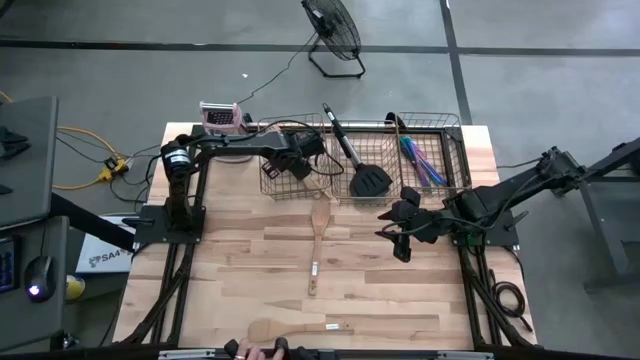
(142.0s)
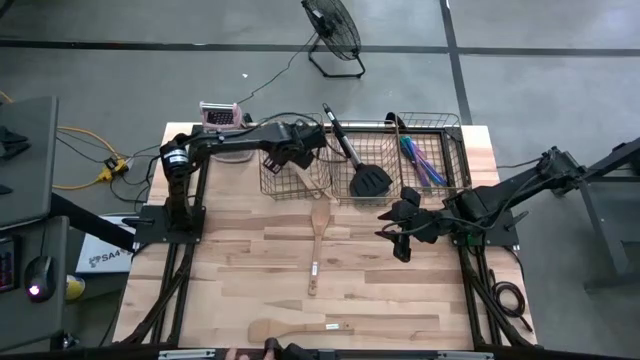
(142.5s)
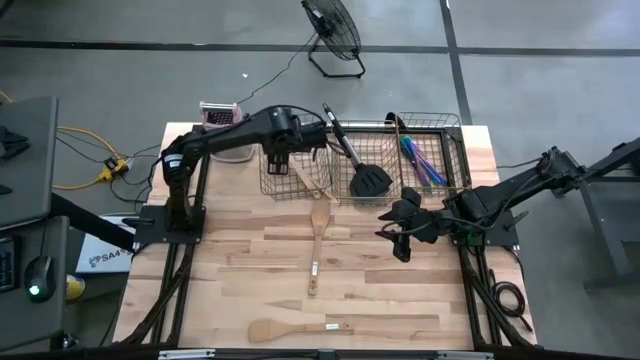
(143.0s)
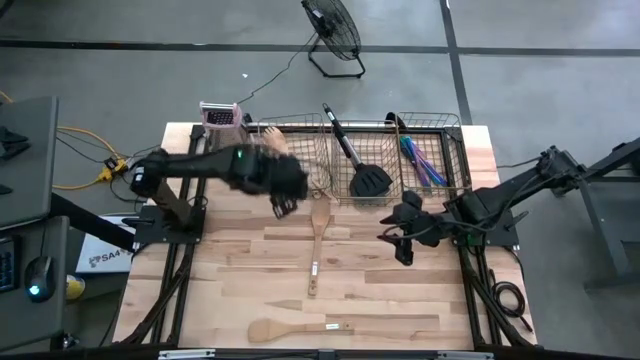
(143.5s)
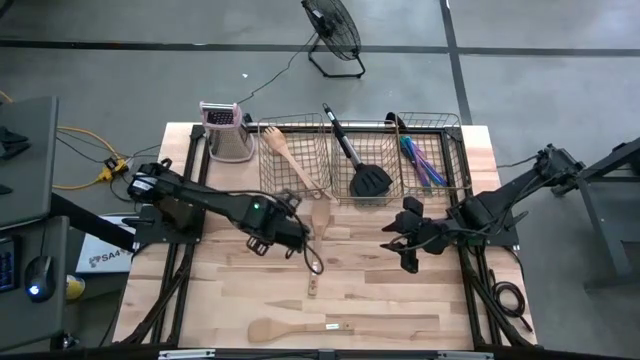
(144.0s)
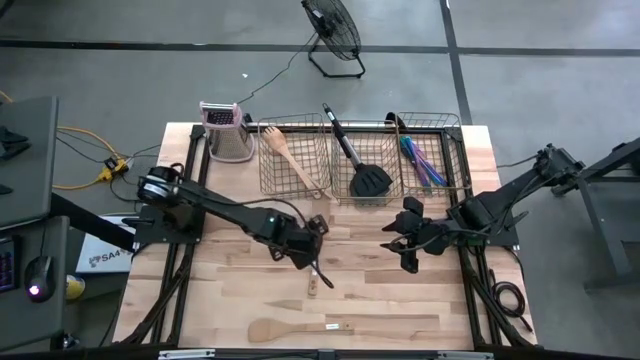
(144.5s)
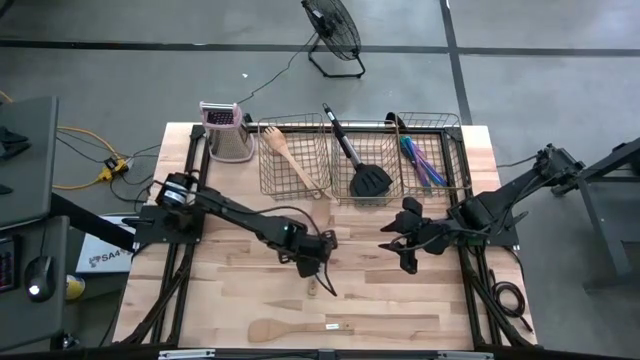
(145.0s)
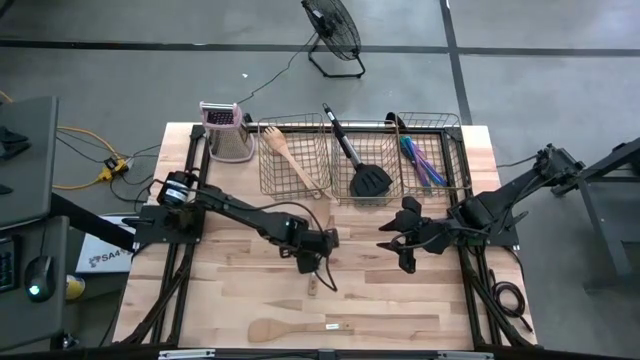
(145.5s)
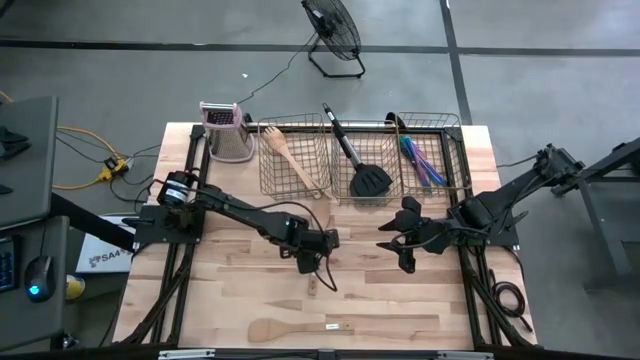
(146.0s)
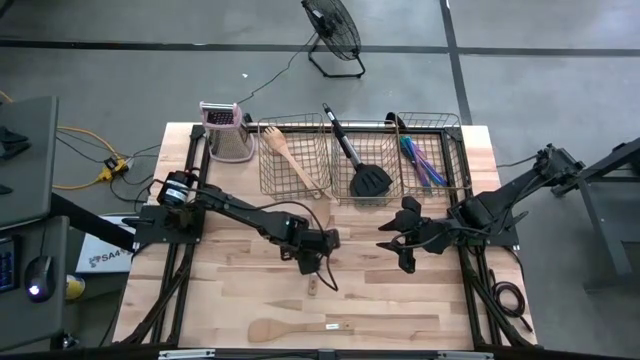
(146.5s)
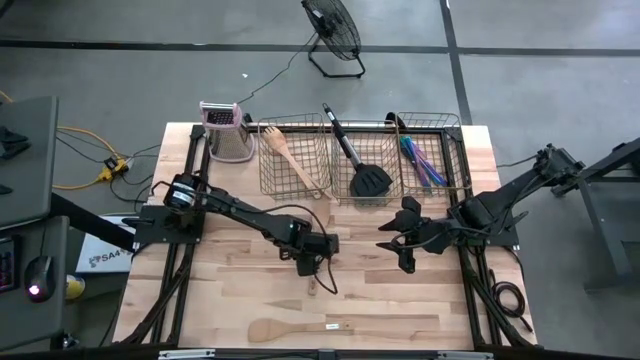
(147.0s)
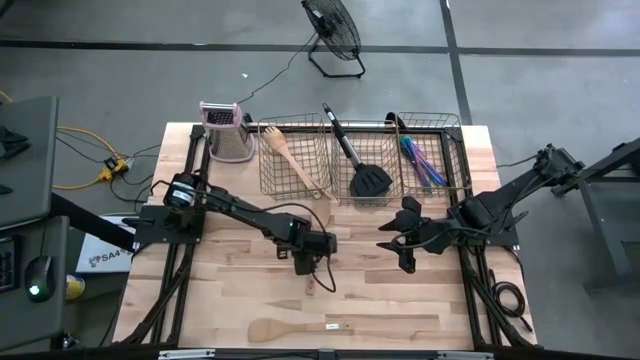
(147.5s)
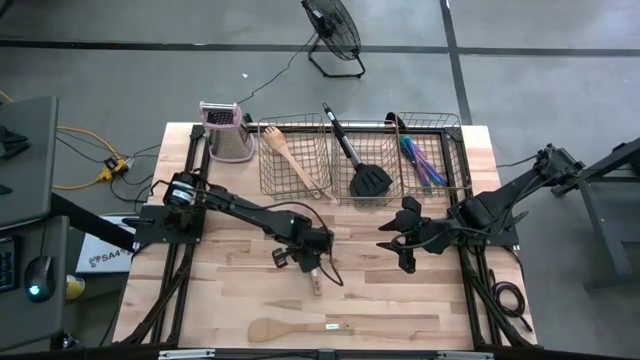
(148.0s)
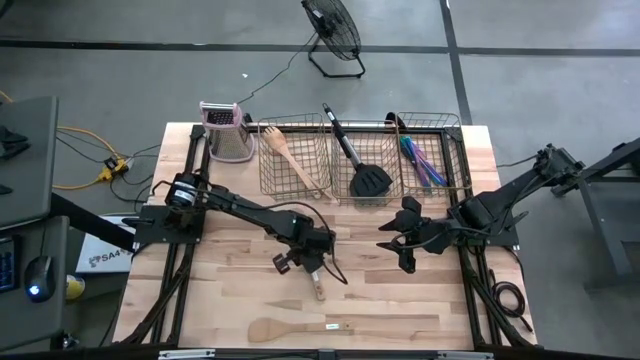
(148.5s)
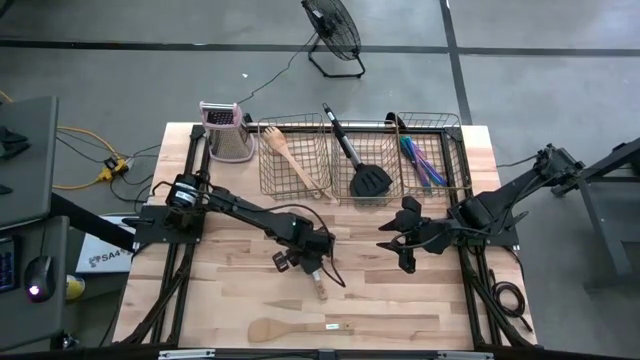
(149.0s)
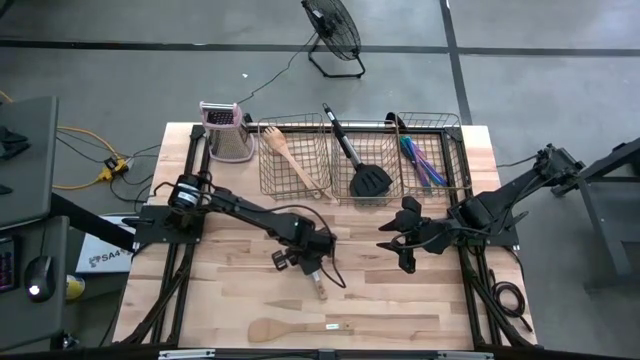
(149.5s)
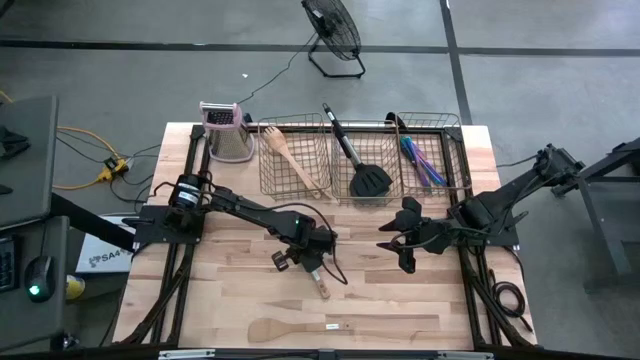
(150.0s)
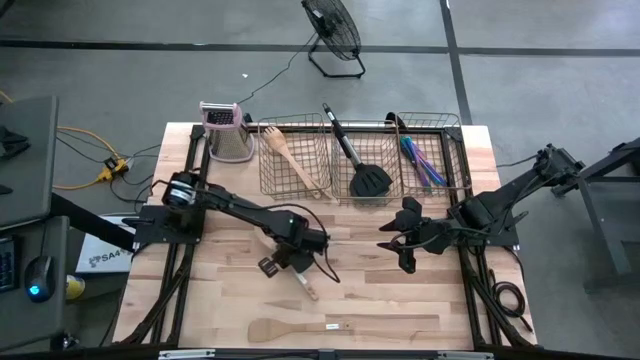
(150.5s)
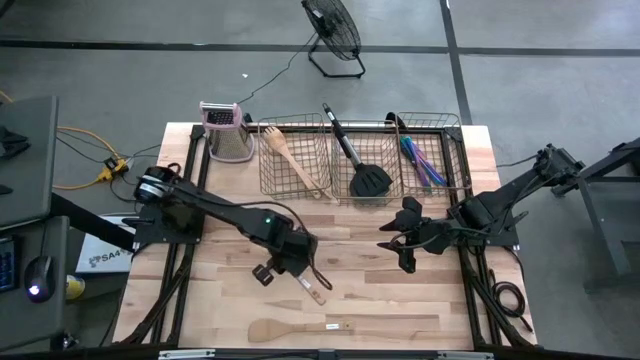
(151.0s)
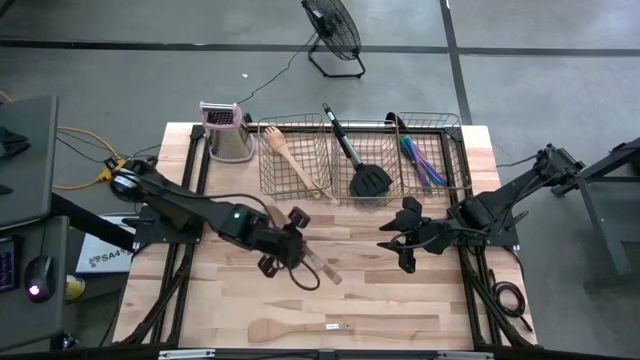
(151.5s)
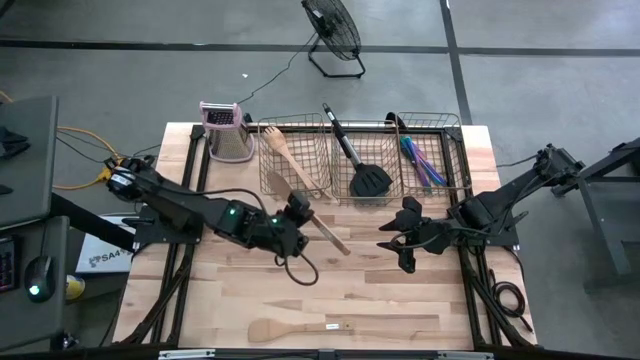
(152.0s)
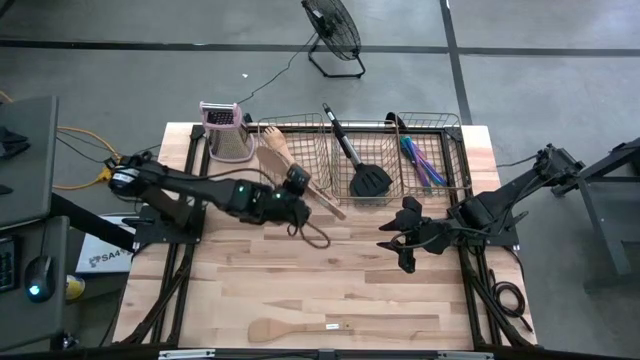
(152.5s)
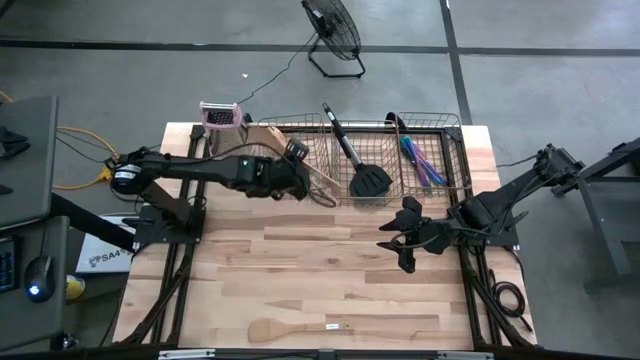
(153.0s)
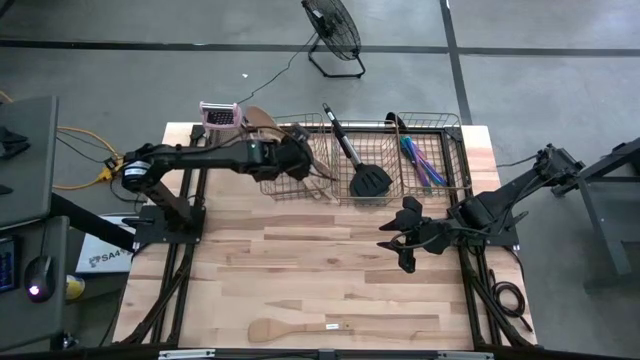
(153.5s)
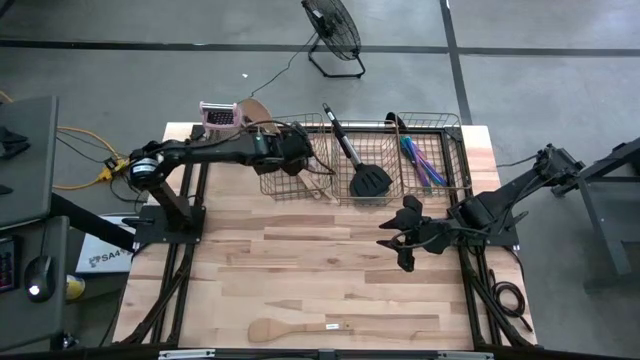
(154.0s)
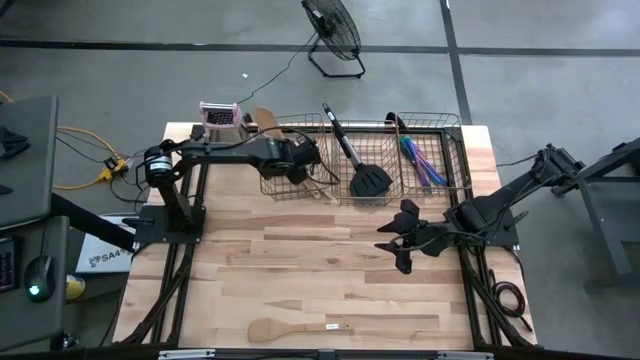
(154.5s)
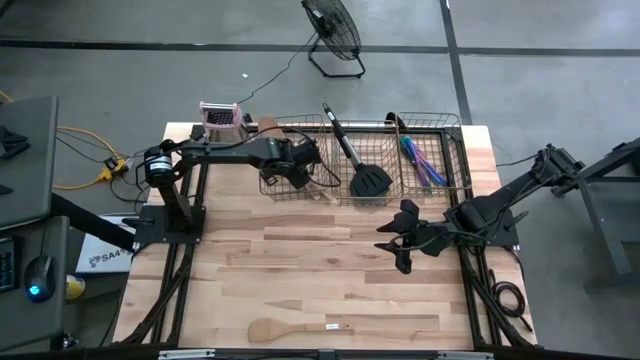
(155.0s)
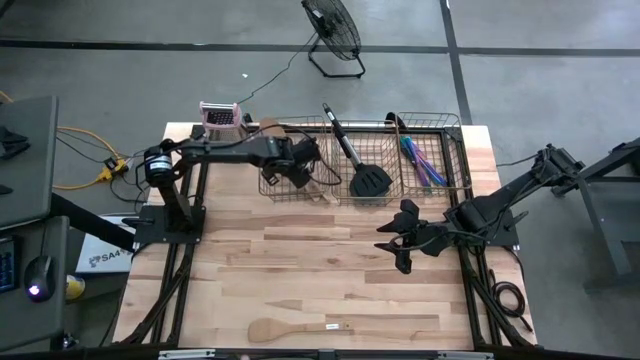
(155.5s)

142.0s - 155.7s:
Task: Pick & Place Kitchen Items
Put the wooden serving spoon into the left mesh basket

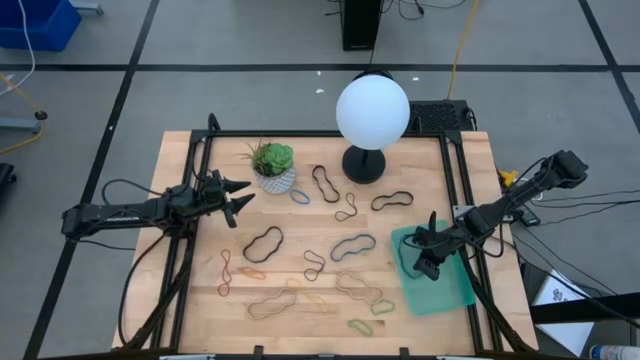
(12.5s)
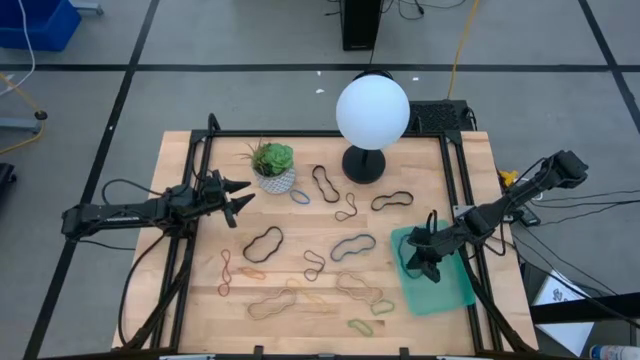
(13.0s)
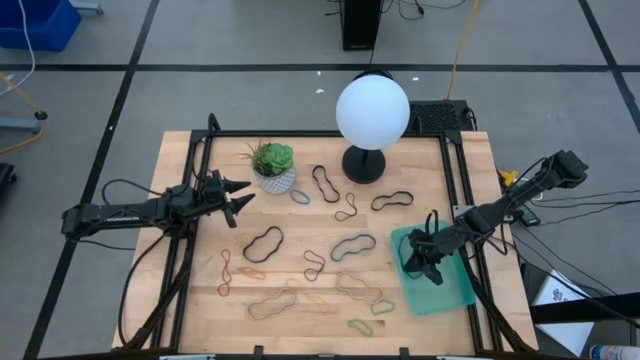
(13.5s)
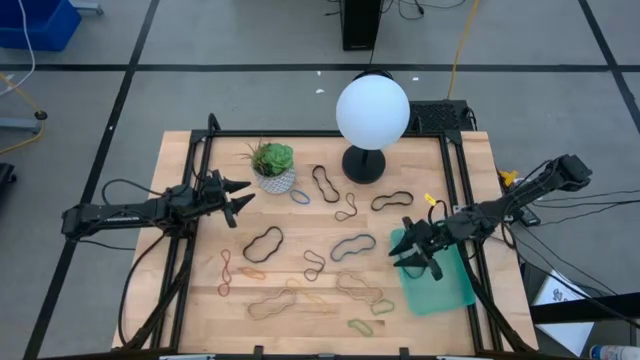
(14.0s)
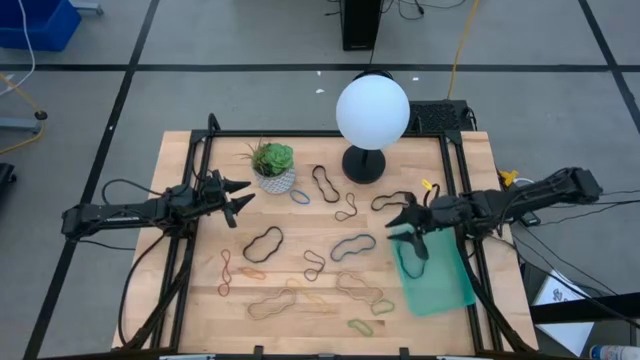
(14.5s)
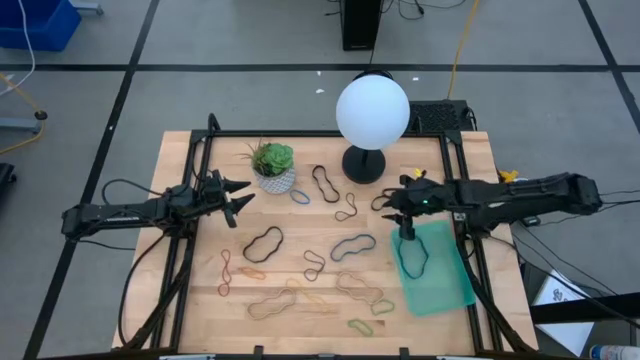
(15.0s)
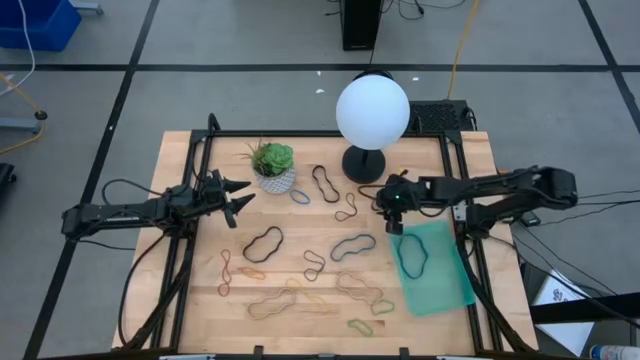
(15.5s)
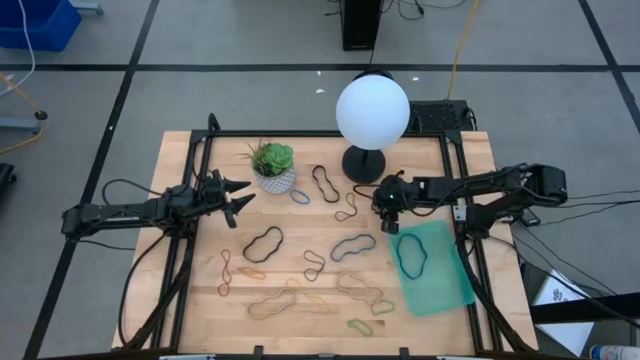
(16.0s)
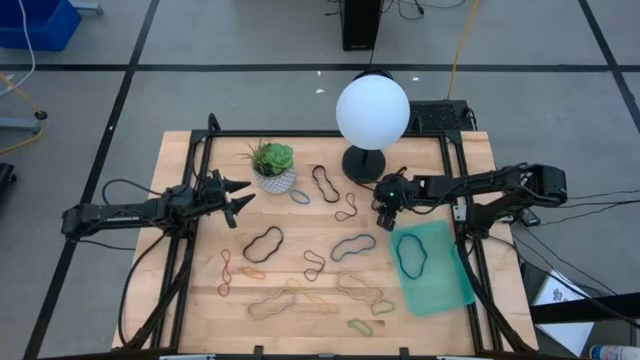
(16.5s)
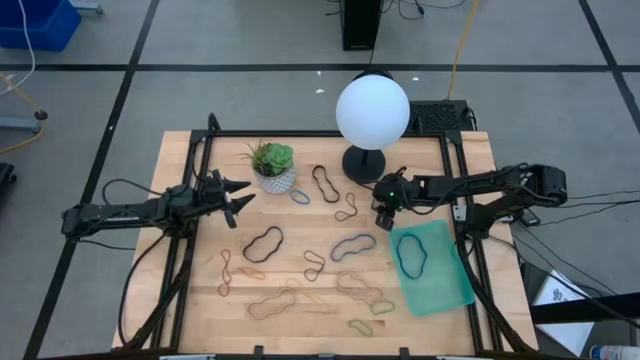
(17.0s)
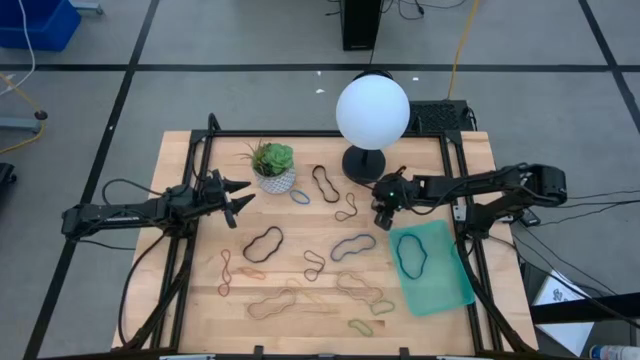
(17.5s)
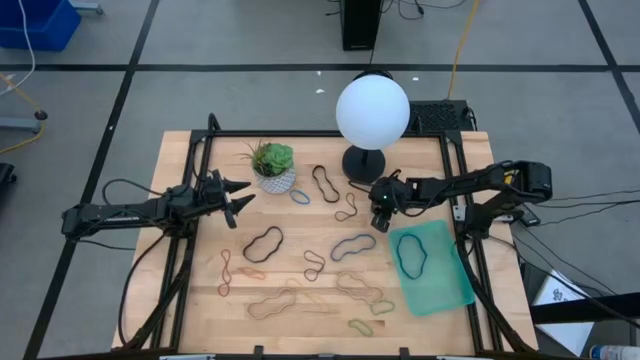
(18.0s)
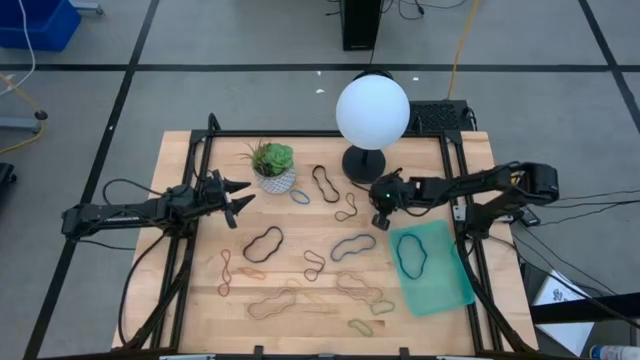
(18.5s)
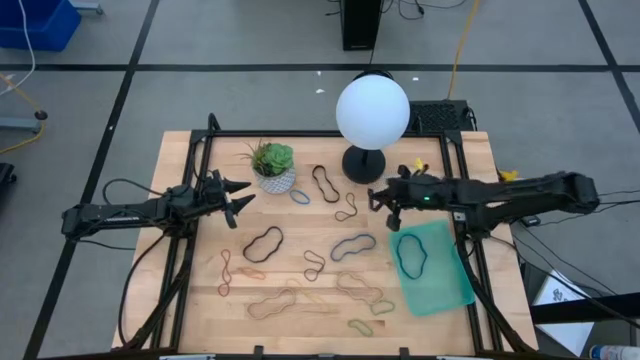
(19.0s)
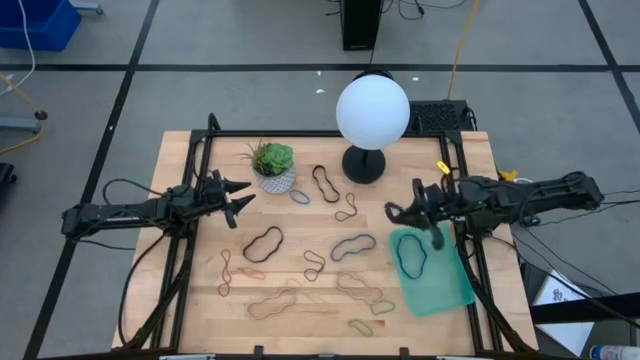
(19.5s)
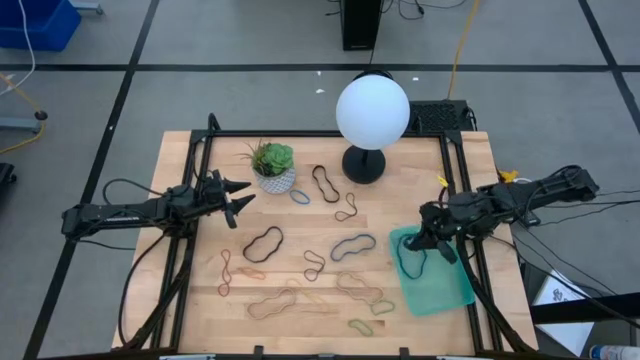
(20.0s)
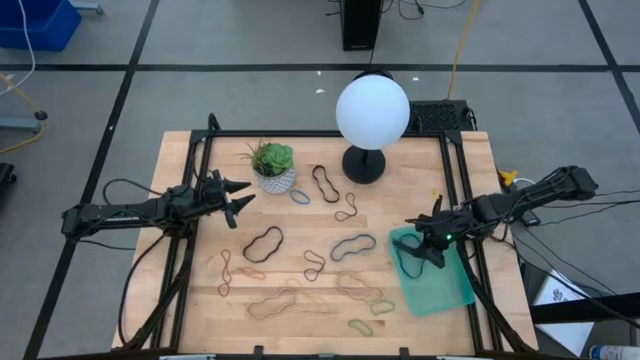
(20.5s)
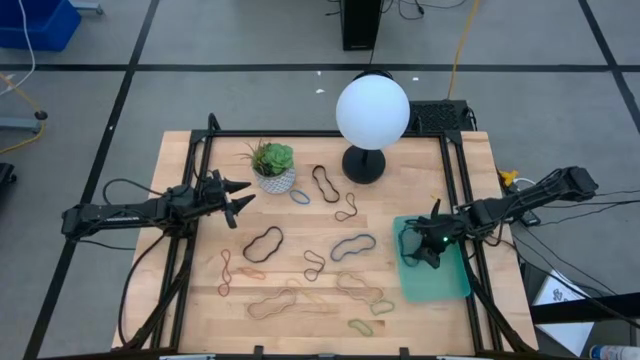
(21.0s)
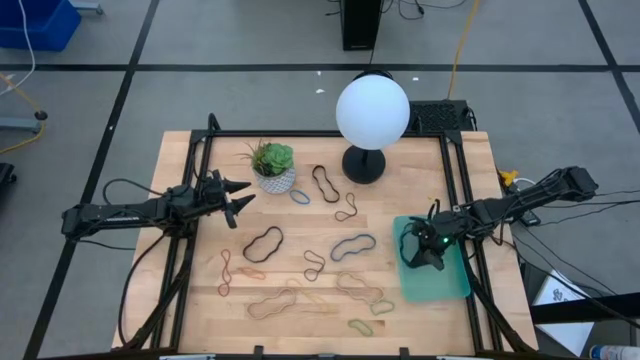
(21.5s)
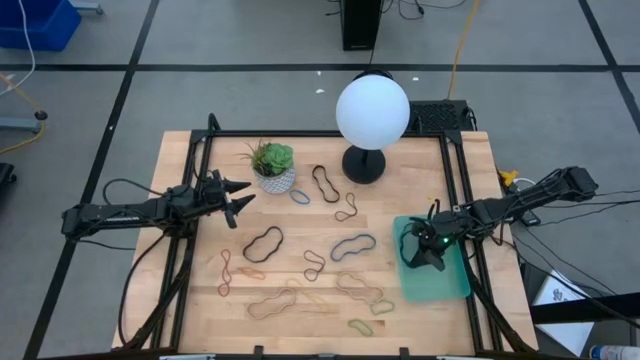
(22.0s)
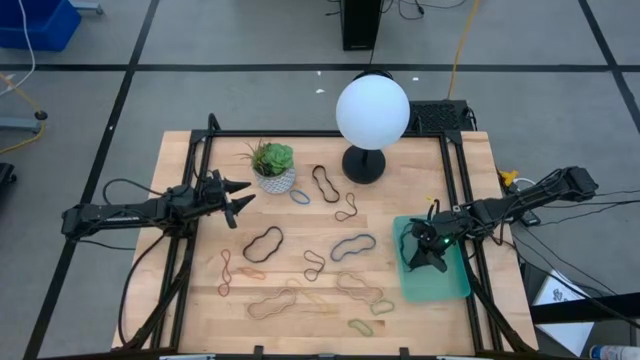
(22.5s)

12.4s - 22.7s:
Task: Pick and place rubber bands into bin
Put the top right black rubber band into the bin
